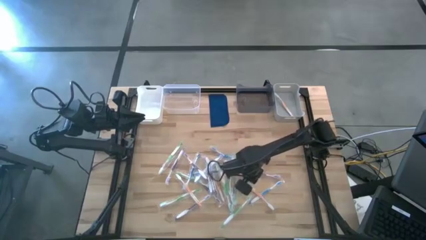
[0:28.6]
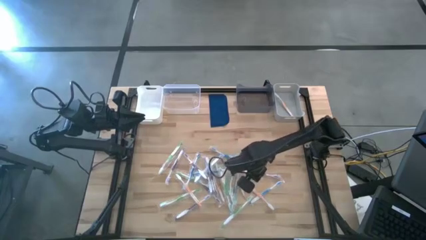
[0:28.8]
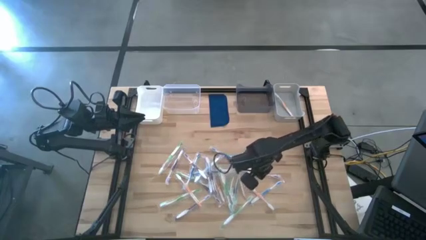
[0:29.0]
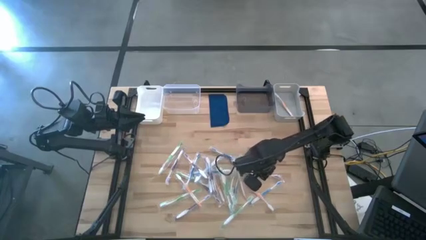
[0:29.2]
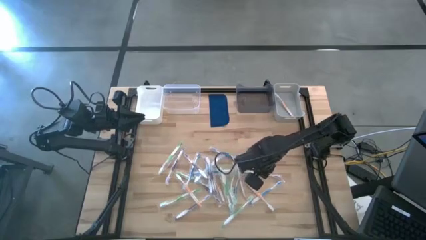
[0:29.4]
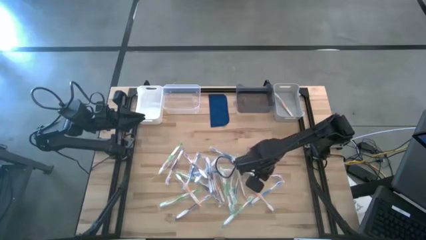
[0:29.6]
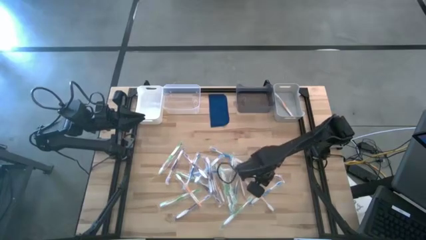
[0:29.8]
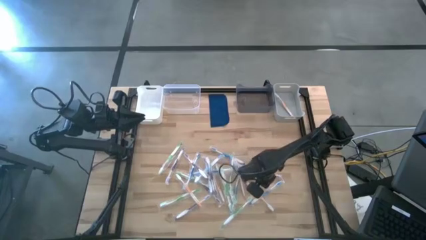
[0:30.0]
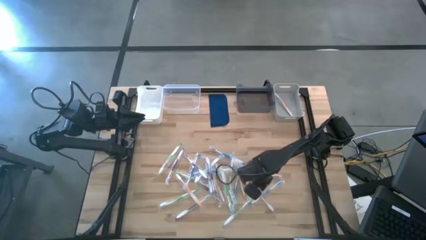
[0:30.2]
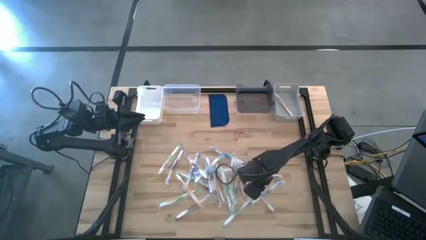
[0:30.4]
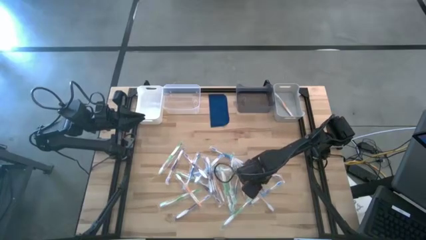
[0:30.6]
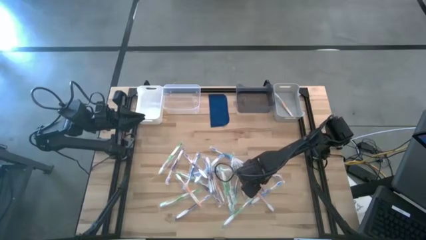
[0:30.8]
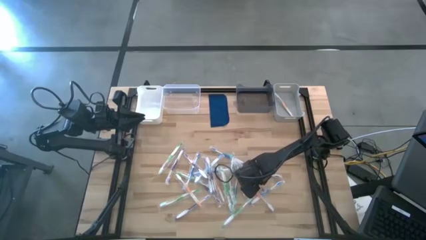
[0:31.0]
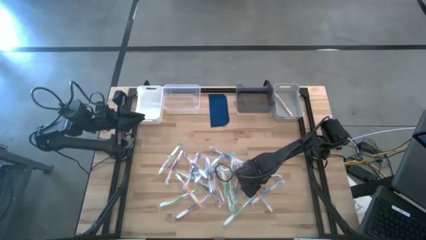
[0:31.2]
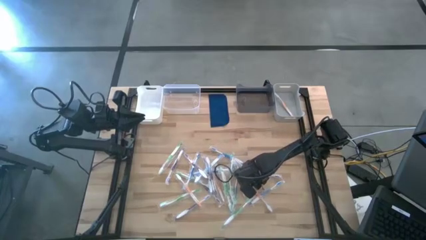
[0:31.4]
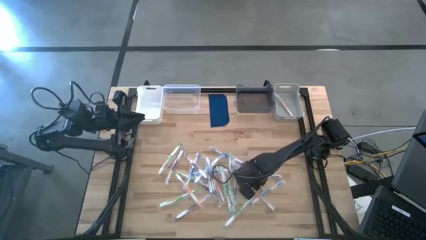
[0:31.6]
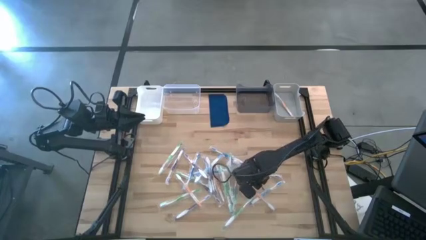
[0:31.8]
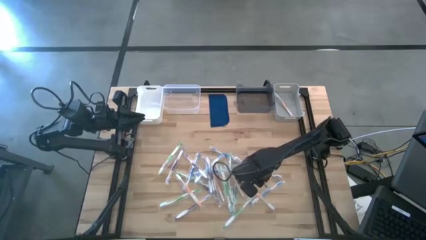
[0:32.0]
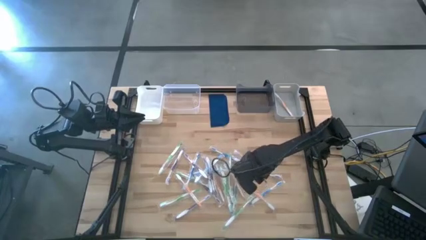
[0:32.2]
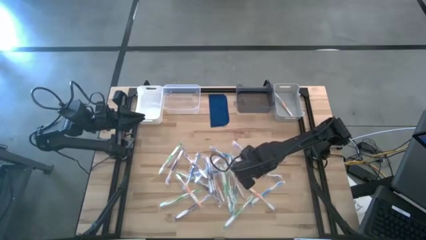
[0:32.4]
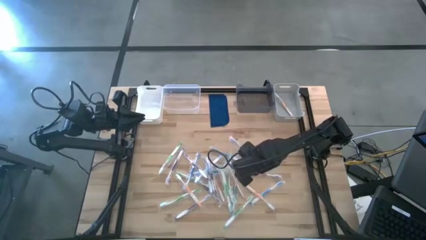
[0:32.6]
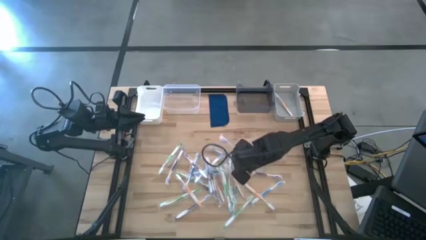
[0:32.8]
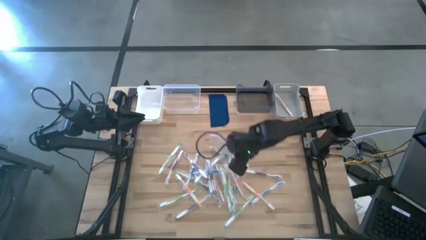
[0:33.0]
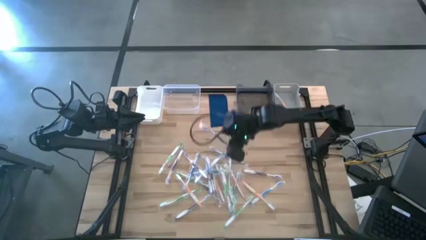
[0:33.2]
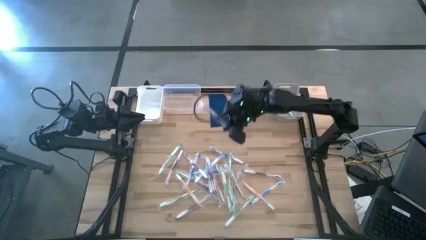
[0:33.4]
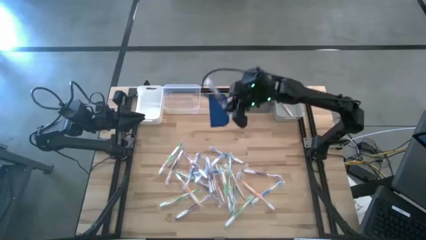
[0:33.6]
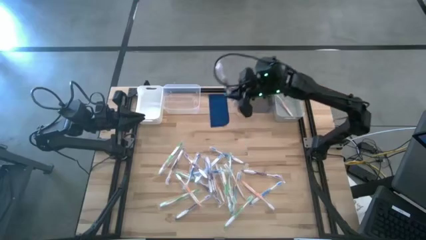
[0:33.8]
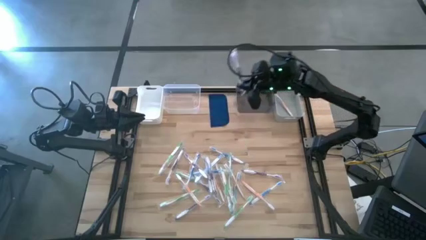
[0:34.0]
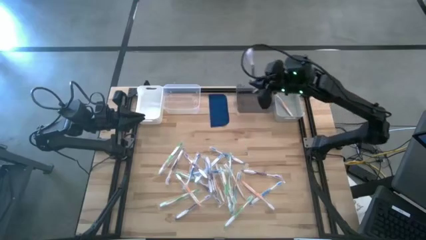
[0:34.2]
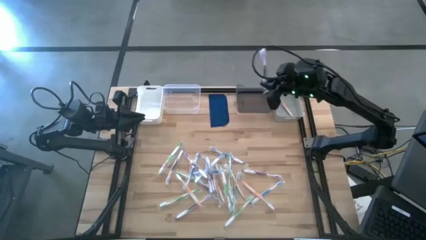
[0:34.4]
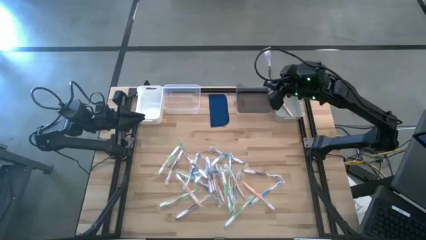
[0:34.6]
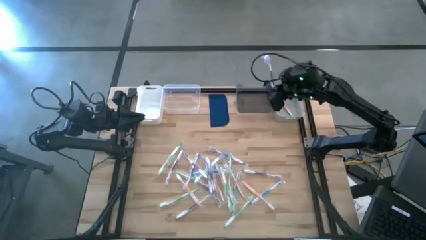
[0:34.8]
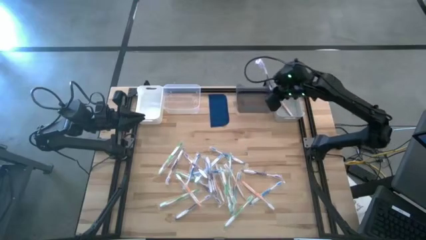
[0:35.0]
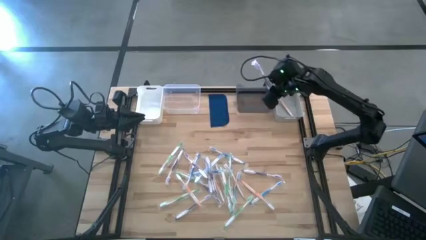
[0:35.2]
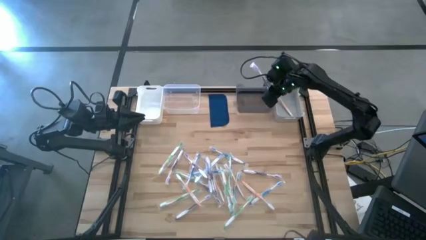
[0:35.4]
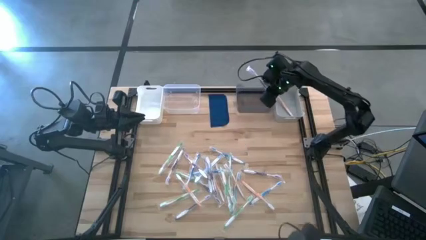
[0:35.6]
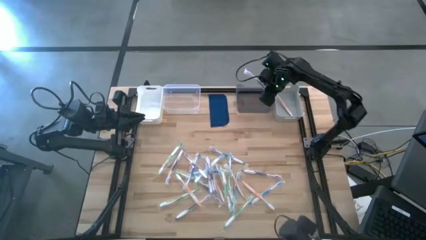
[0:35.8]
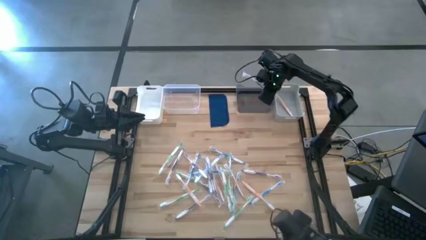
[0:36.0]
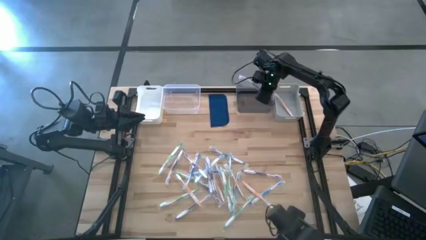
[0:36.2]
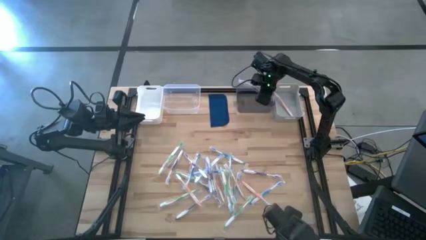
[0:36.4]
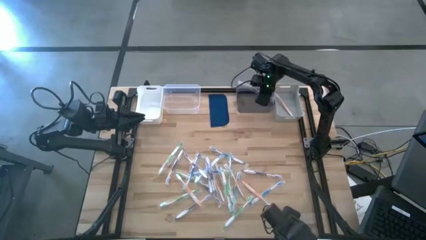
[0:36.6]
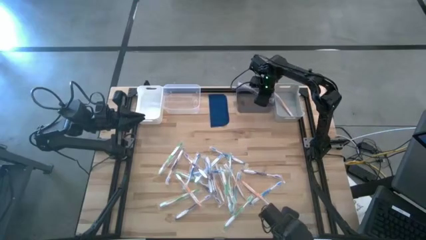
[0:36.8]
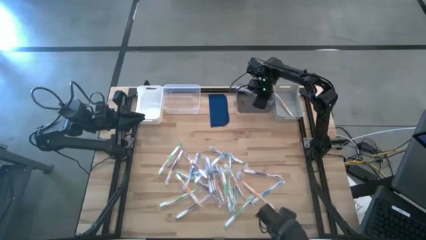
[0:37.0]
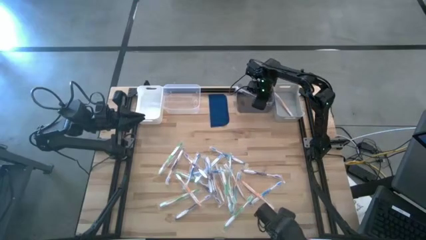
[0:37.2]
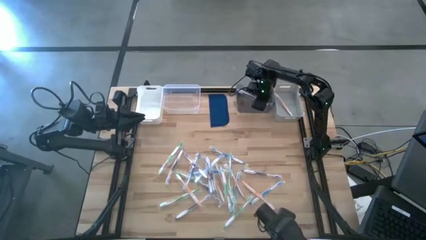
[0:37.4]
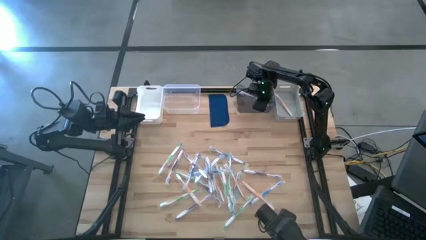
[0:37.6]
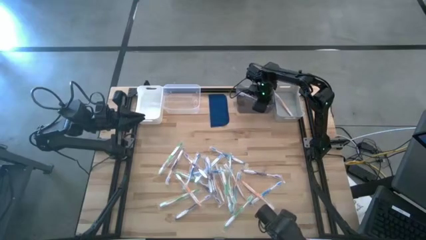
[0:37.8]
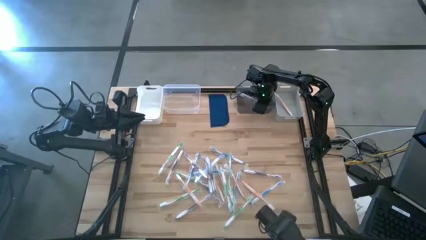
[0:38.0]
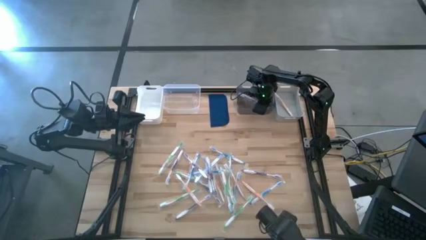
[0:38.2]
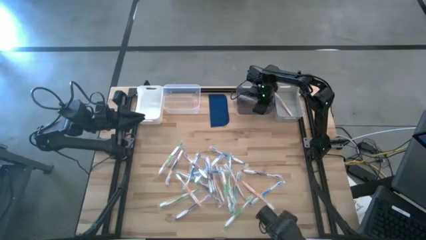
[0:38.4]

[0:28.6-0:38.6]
Task: Pick & Place Toothbrushes
Put the purple toothbrush into the black bin

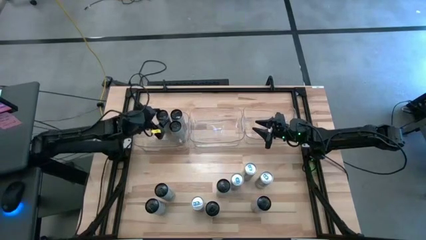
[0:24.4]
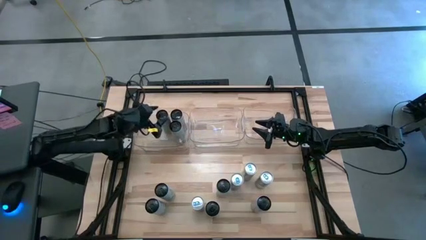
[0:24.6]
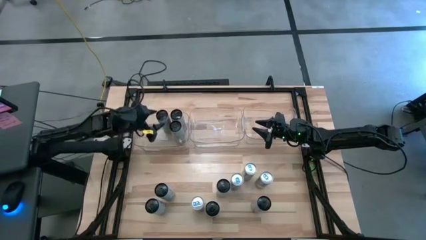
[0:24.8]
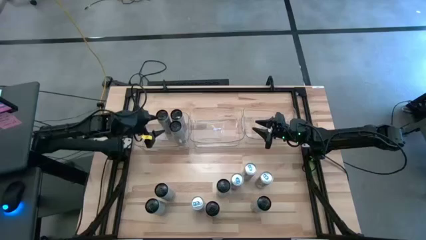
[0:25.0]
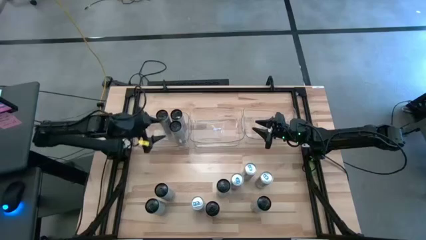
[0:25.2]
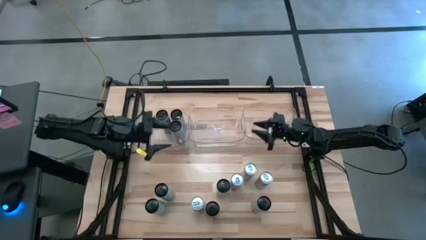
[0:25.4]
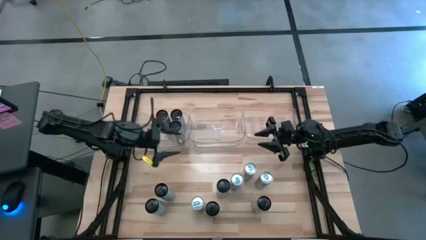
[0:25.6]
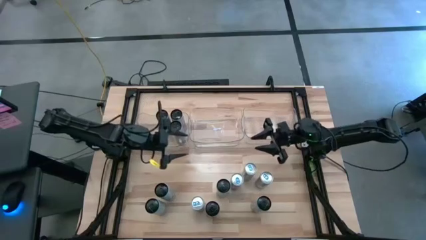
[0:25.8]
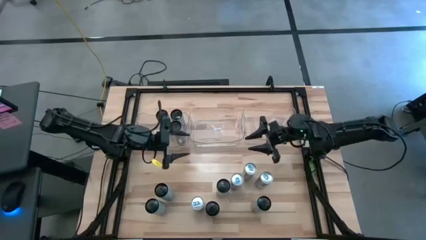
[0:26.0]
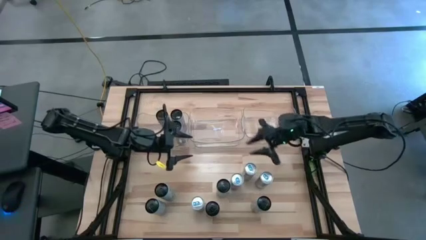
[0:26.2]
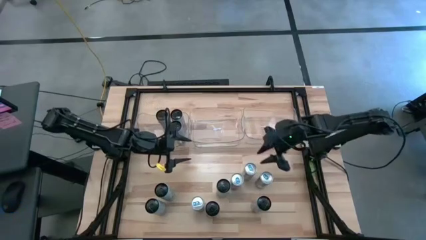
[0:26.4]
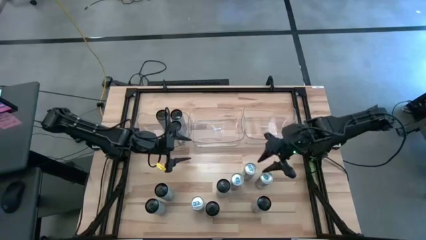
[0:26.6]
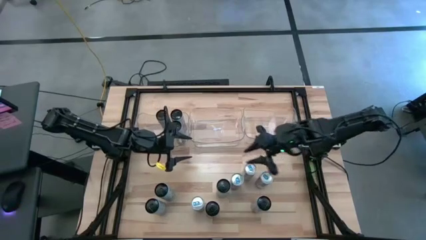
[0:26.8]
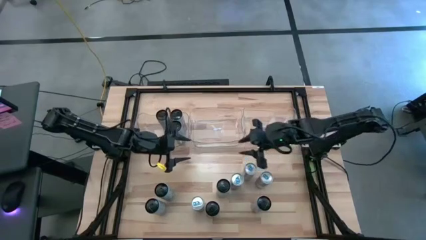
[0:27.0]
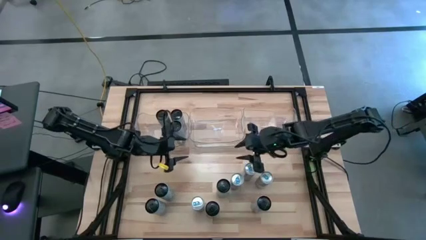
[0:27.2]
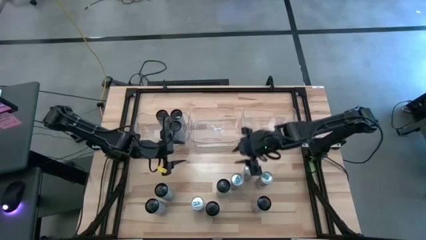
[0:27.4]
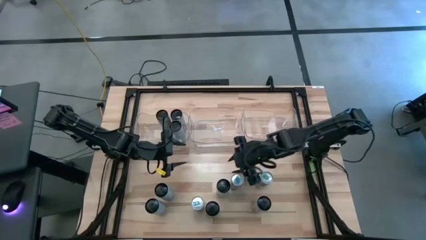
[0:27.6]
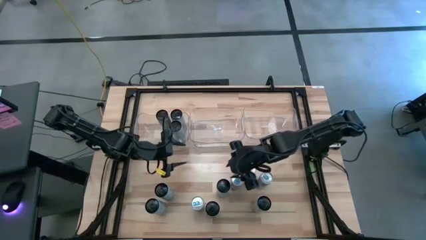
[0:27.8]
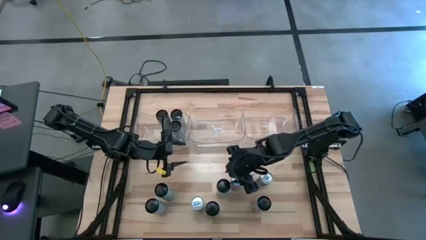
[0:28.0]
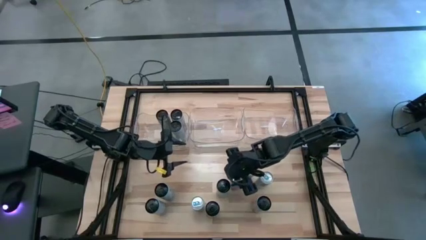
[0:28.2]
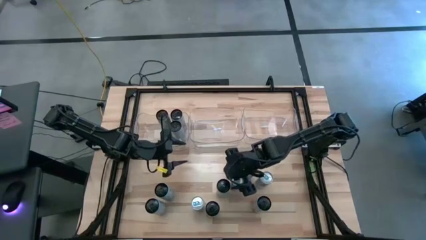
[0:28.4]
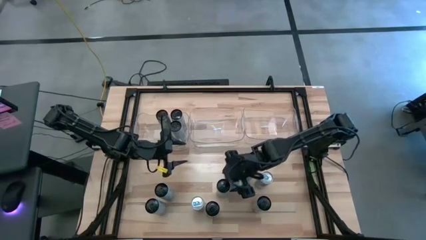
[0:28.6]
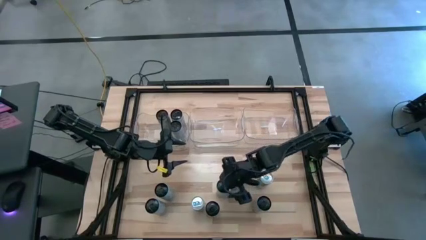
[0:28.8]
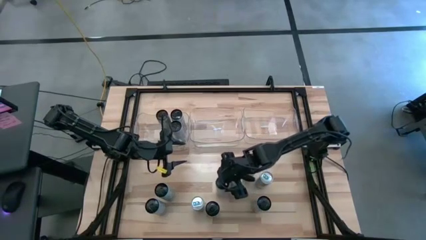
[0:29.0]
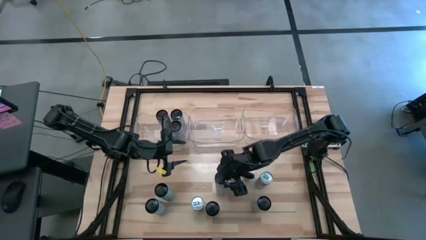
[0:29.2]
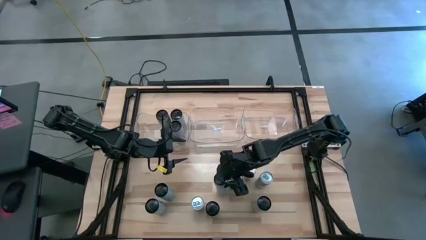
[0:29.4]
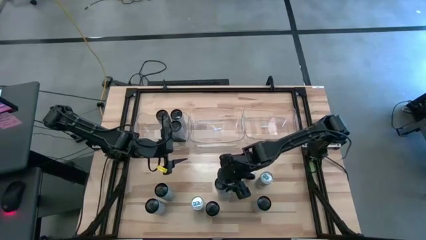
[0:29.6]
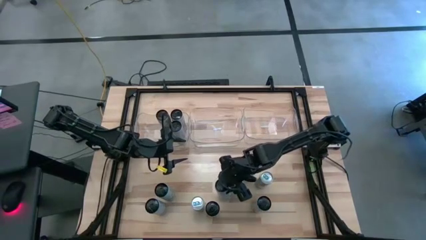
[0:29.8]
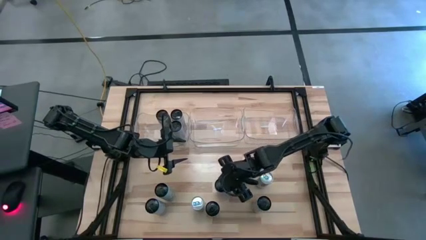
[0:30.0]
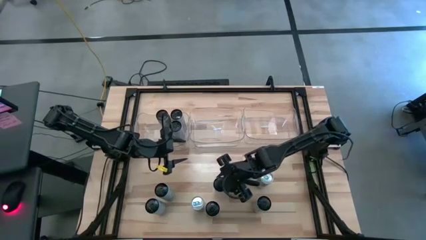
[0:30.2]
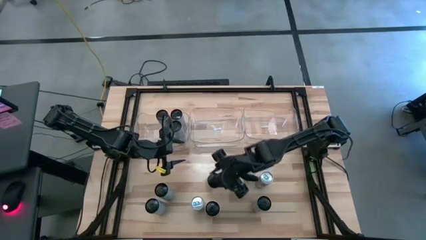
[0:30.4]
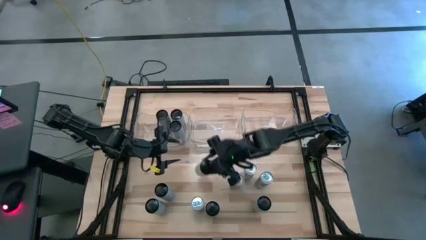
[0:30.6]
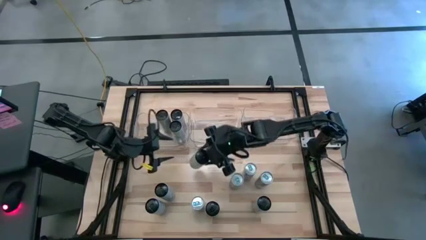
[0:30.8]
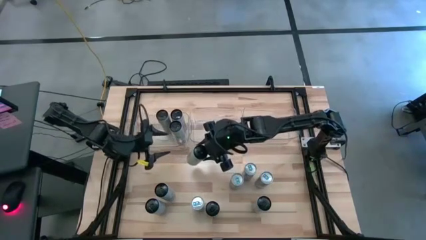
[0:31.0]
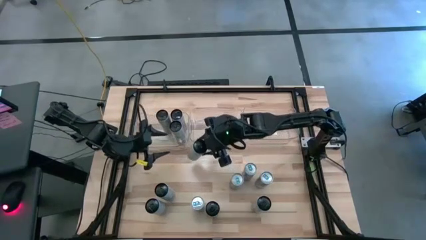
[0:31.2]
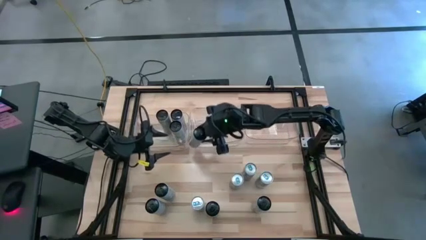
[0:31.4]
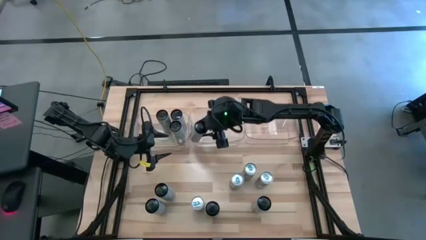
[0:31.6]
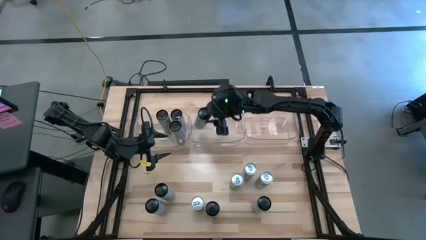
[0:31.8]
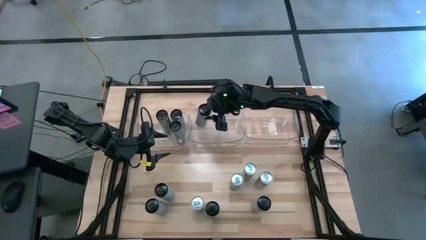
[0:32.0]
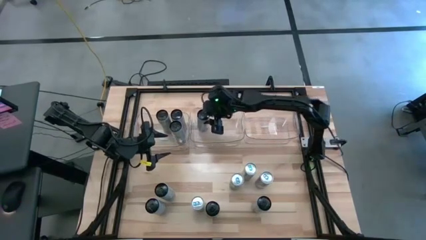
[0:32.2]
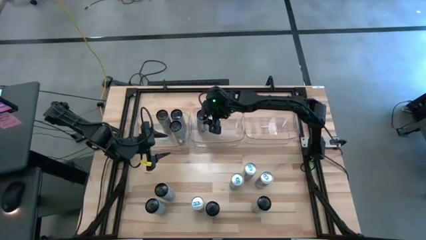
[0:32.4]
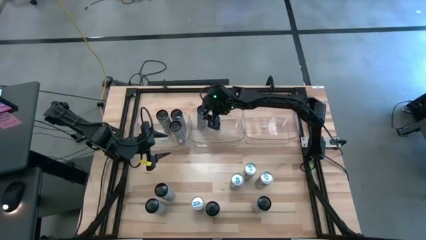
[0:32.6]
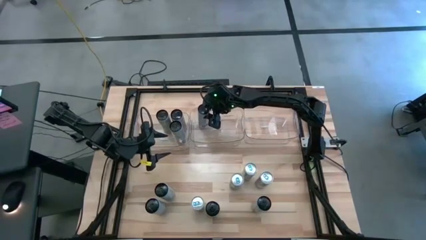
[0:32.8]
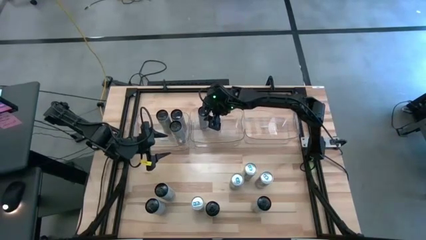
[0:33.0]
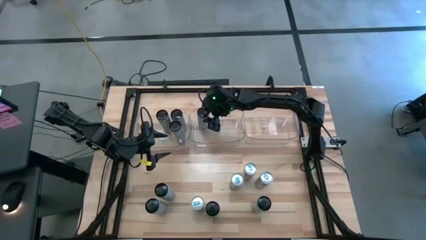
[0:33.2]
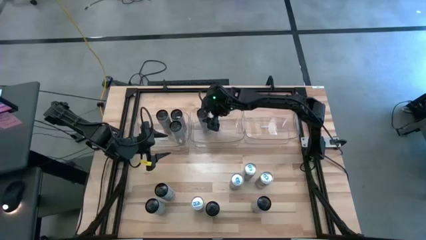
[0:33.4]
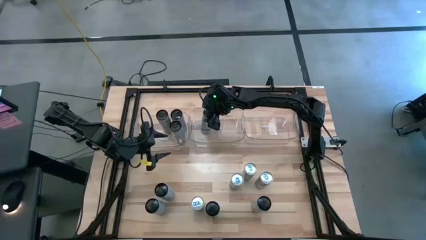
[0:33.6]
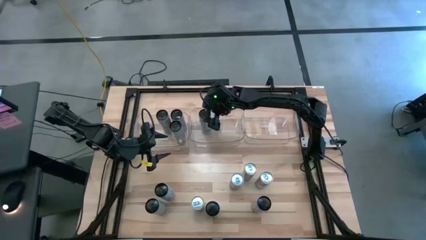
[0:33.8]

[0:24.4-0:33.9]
Task: Sort soda cans
Put the blue soda can into the center transparent bin
